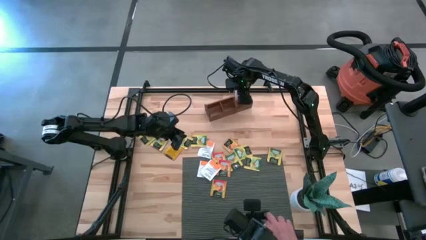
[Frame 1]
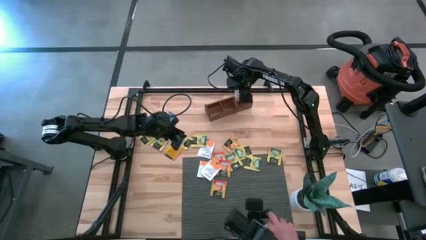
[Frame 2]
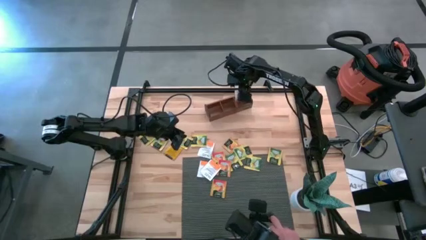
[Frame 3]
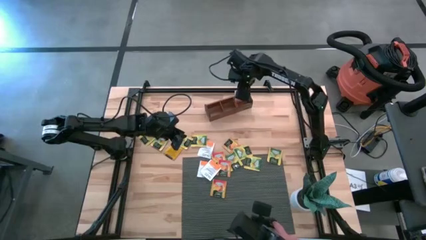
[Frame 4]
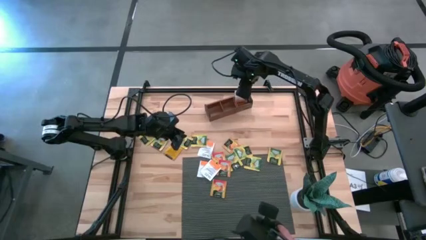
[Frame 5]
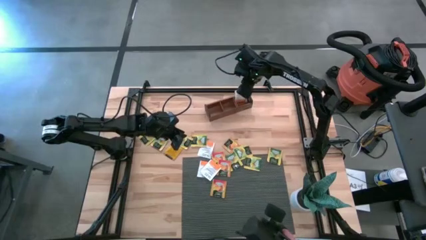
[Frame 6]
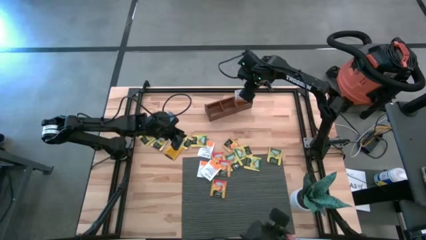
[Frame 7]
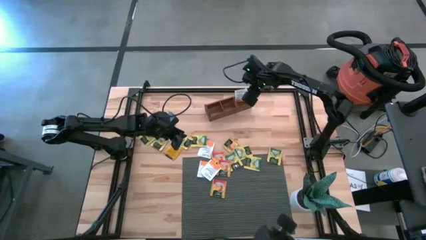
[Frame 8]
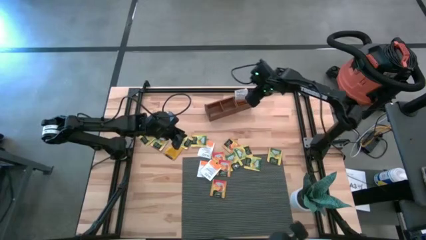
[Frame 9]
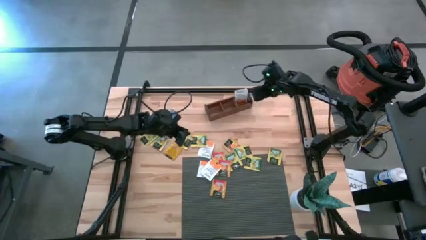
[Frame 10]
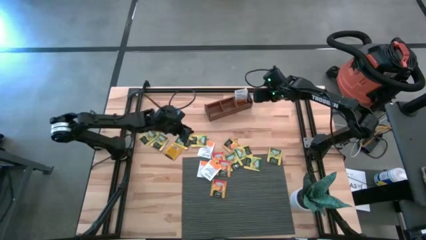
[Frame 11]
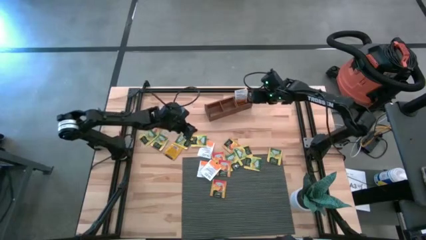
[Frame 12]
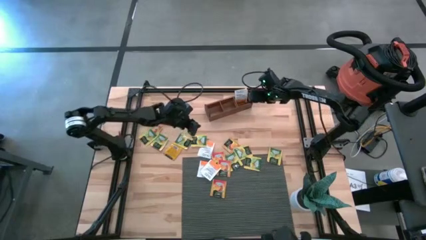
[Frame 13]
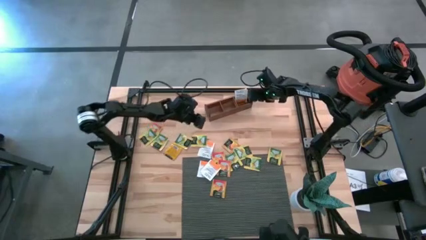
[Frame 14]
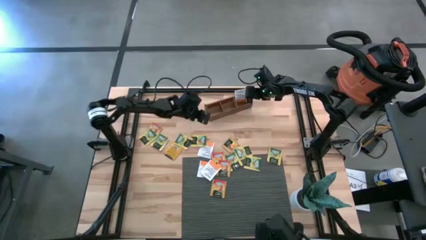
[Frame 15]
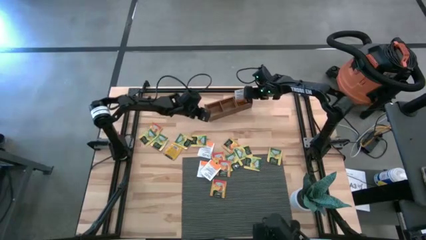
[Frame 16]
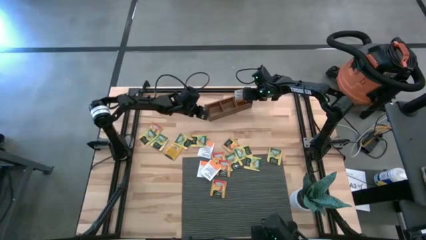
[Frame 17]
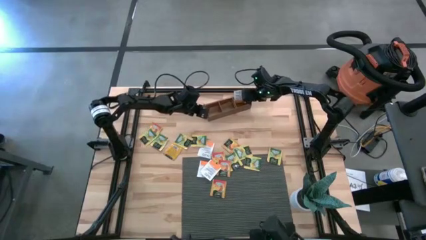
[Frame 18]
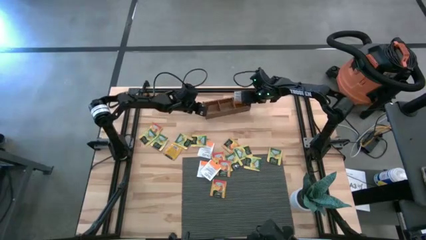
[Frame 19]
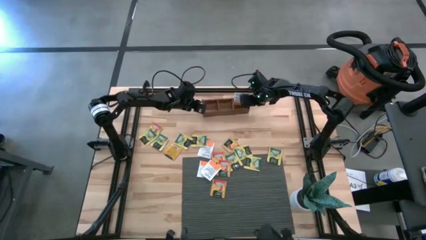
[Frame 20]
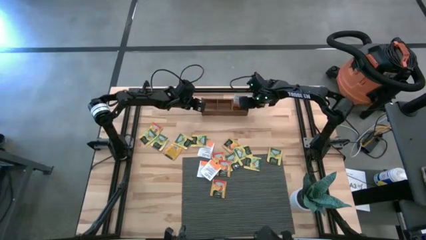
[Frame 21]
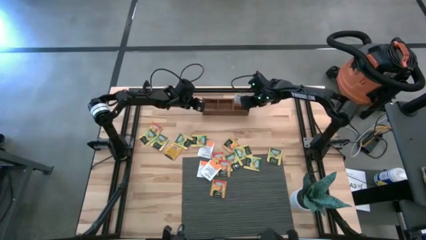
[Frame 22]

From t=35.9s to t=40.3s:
Task: Pick & Place Tea
Adjust the wooden organizer

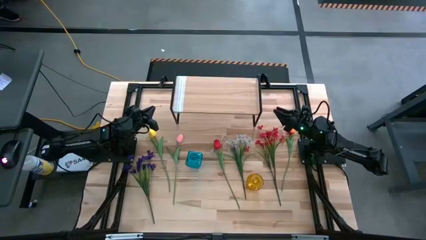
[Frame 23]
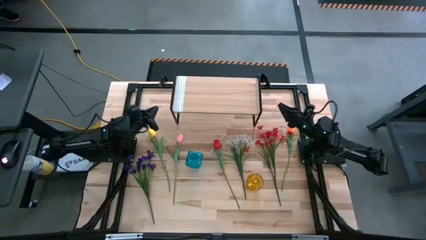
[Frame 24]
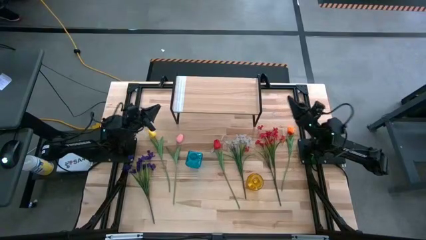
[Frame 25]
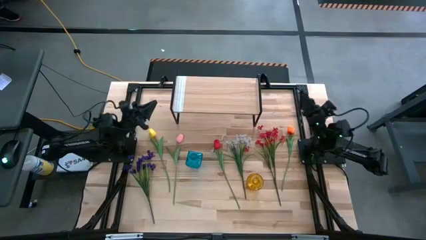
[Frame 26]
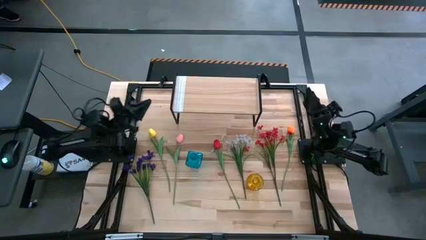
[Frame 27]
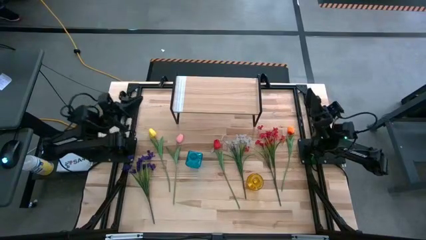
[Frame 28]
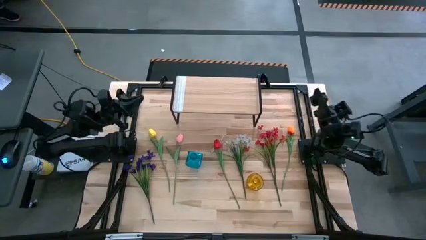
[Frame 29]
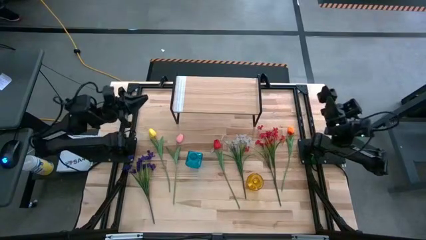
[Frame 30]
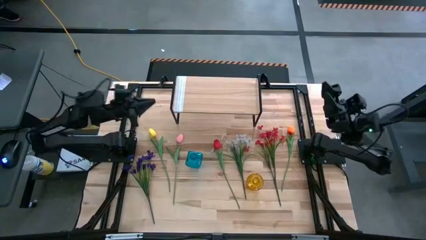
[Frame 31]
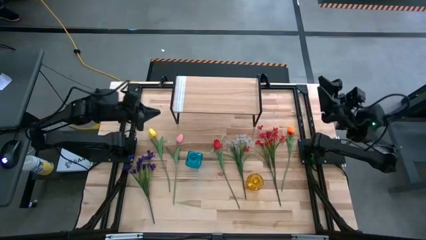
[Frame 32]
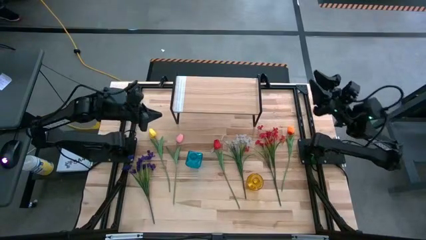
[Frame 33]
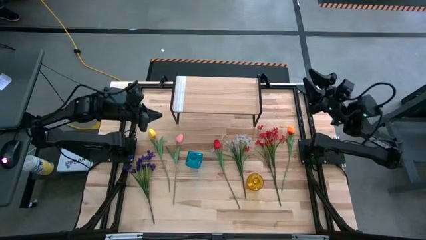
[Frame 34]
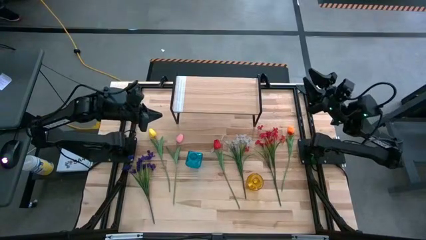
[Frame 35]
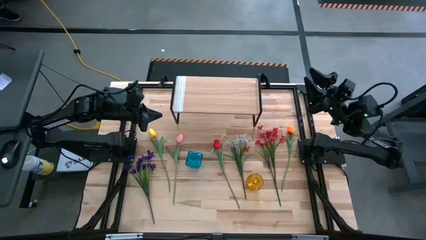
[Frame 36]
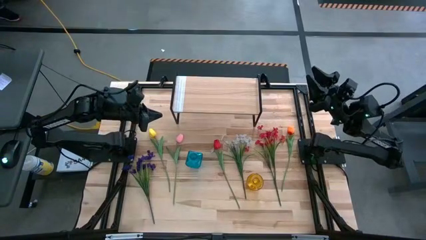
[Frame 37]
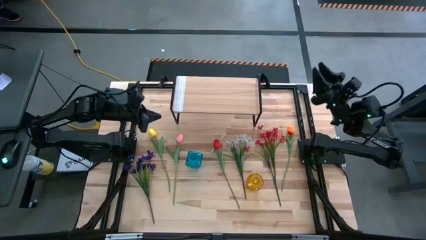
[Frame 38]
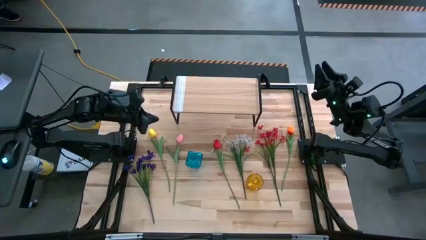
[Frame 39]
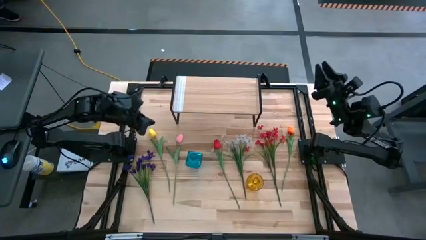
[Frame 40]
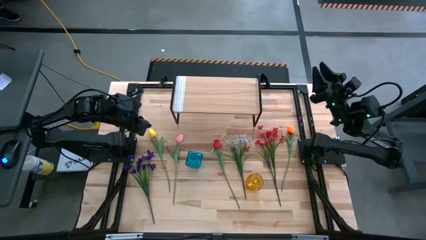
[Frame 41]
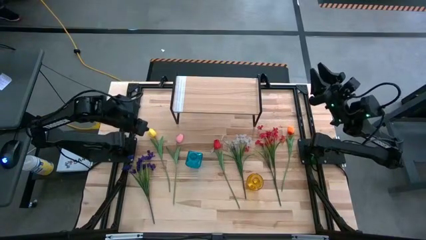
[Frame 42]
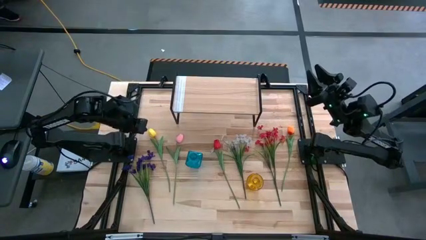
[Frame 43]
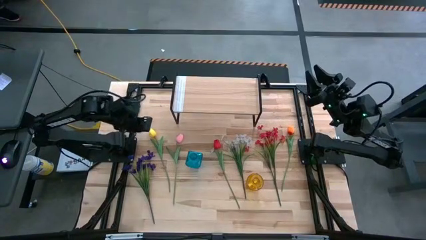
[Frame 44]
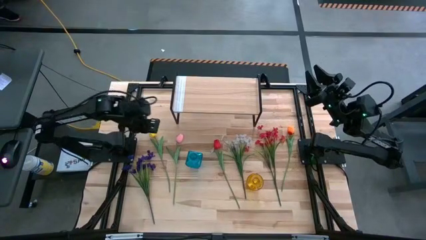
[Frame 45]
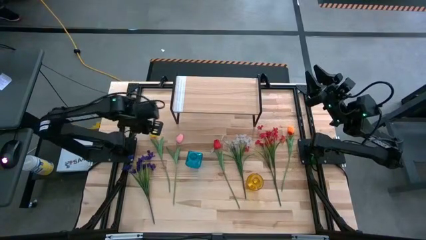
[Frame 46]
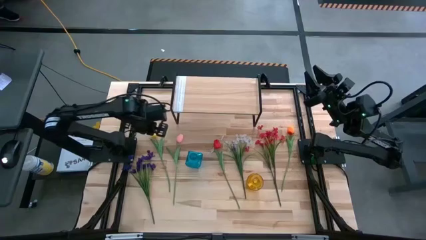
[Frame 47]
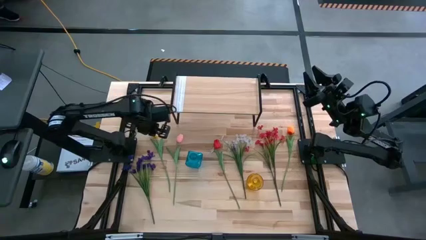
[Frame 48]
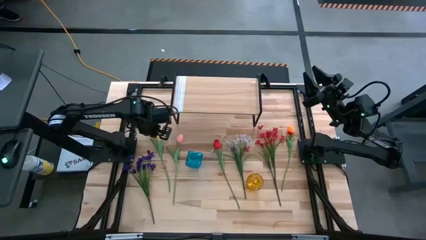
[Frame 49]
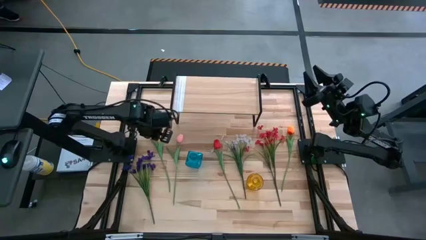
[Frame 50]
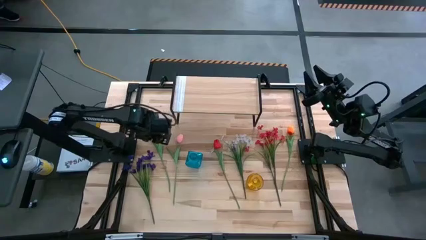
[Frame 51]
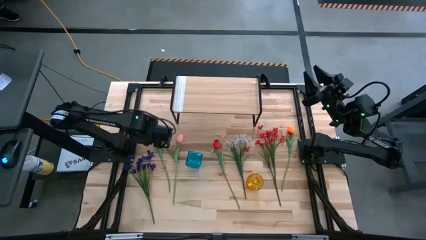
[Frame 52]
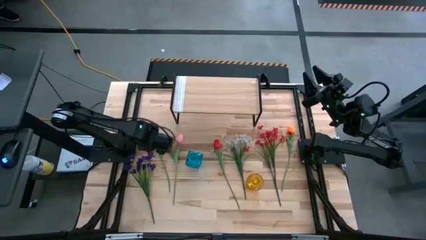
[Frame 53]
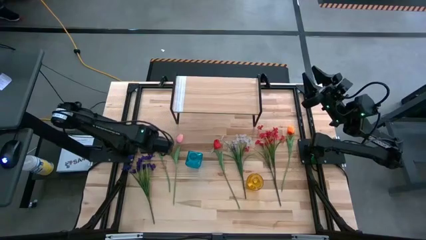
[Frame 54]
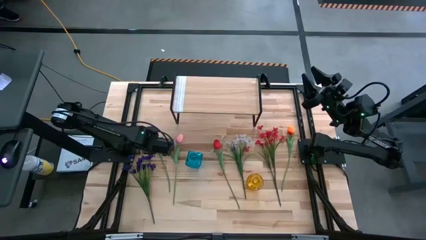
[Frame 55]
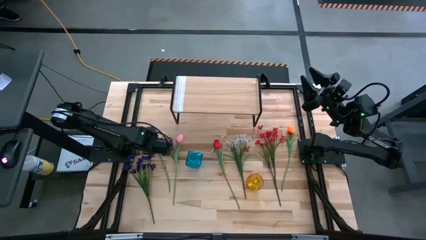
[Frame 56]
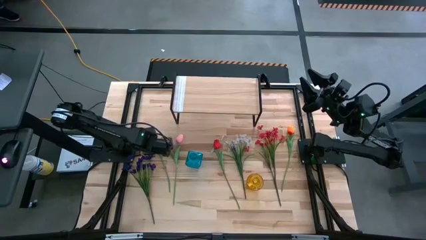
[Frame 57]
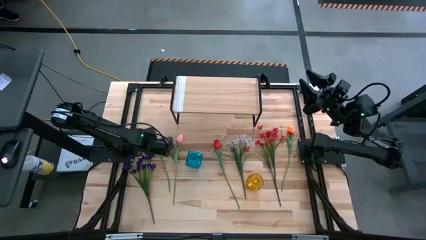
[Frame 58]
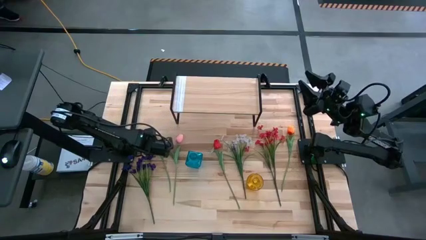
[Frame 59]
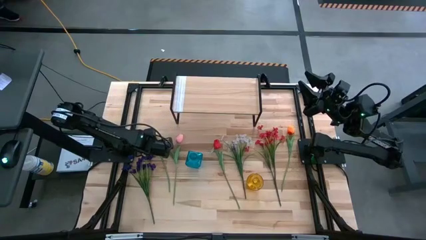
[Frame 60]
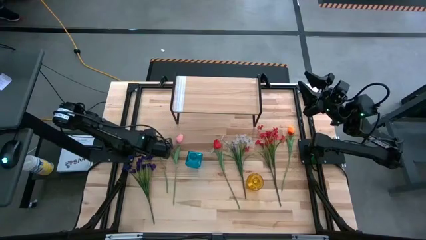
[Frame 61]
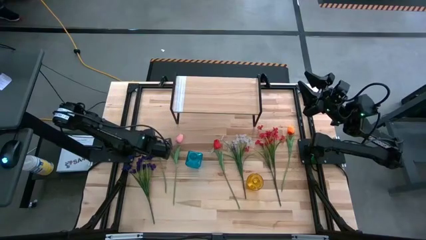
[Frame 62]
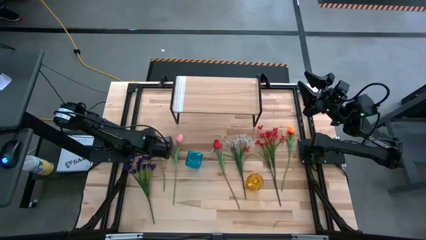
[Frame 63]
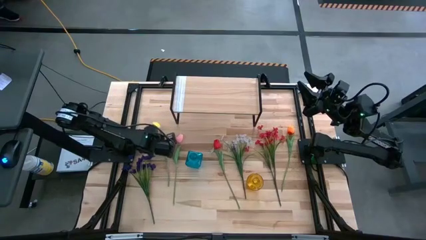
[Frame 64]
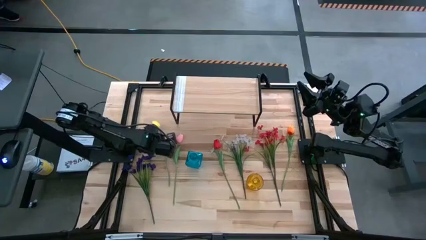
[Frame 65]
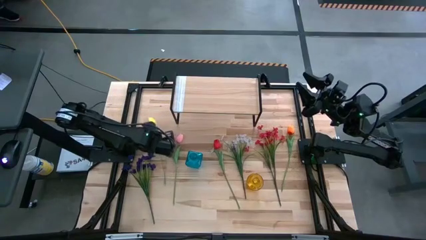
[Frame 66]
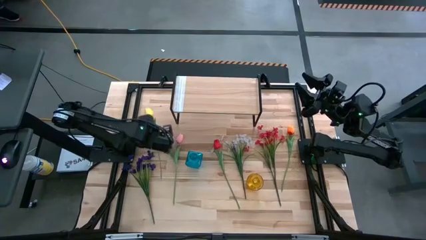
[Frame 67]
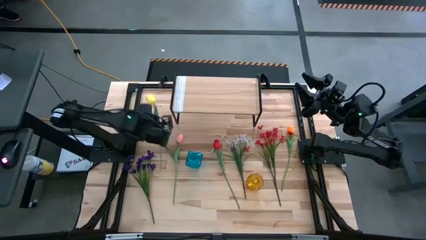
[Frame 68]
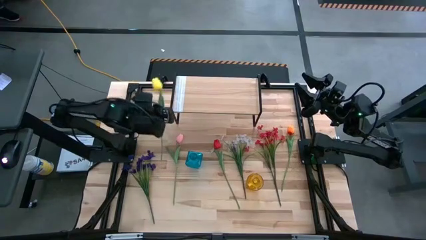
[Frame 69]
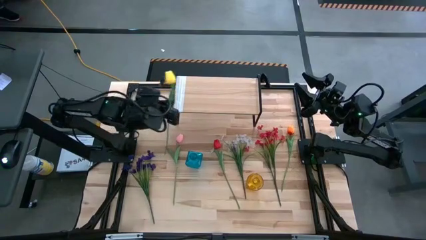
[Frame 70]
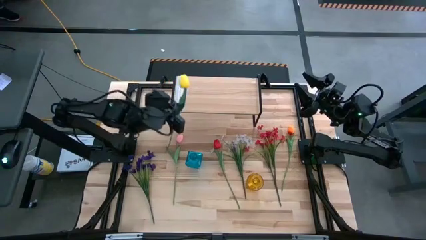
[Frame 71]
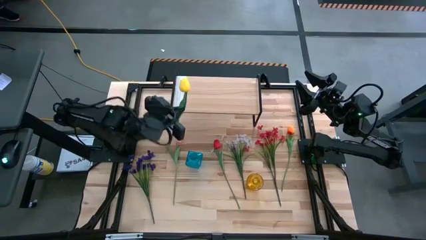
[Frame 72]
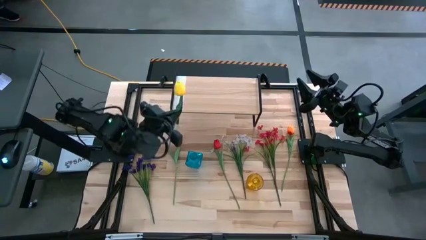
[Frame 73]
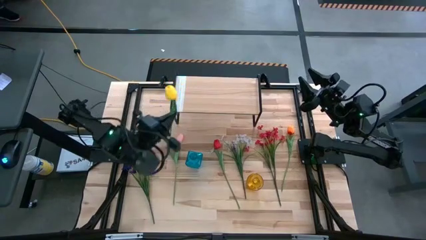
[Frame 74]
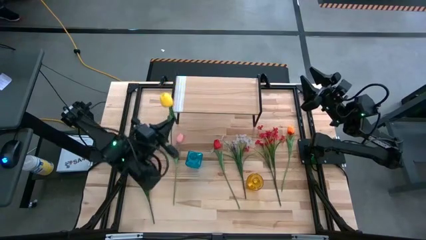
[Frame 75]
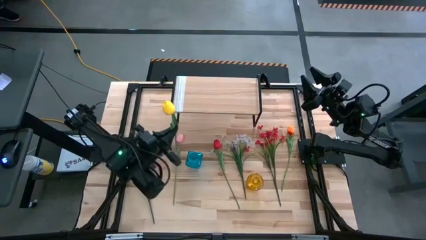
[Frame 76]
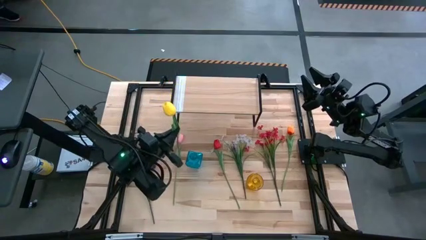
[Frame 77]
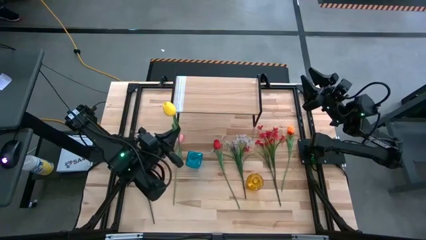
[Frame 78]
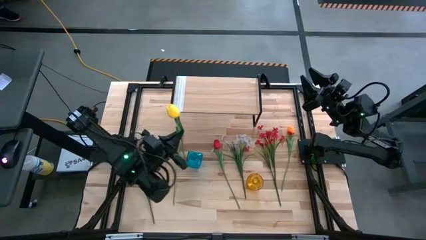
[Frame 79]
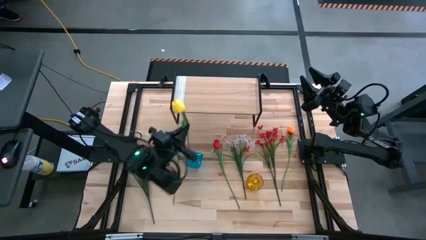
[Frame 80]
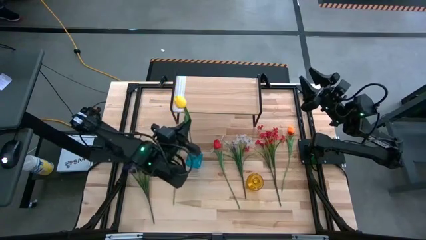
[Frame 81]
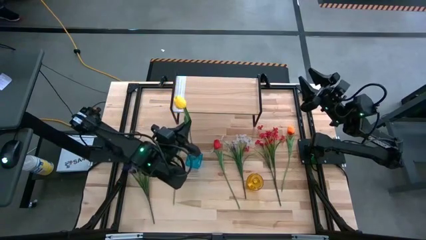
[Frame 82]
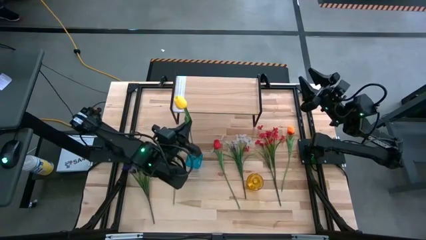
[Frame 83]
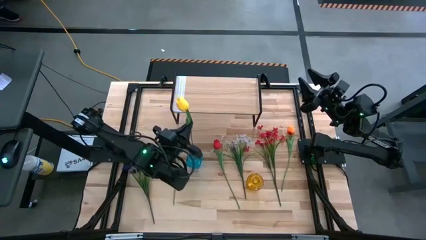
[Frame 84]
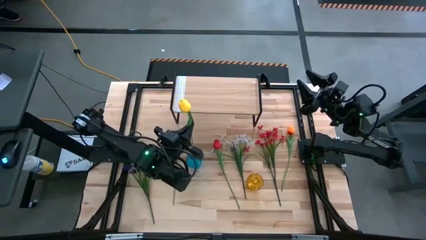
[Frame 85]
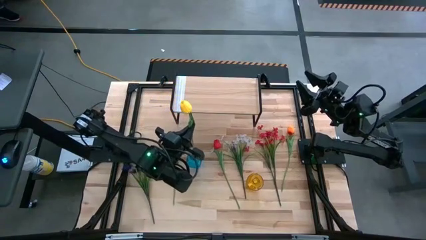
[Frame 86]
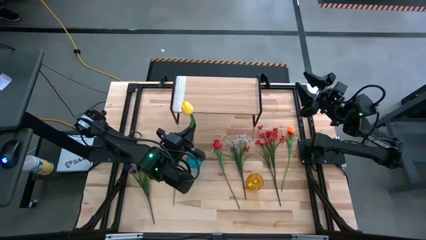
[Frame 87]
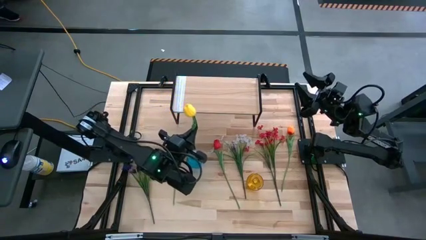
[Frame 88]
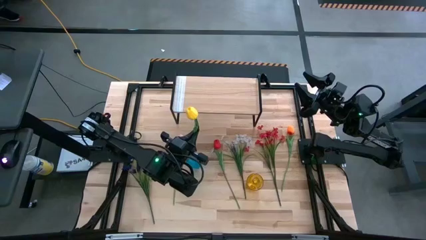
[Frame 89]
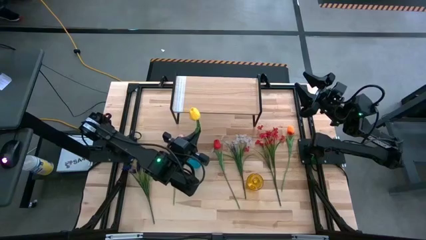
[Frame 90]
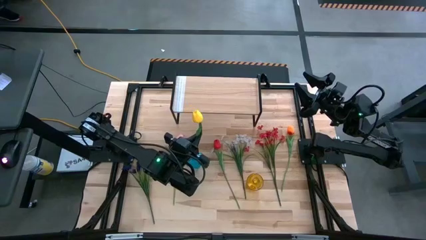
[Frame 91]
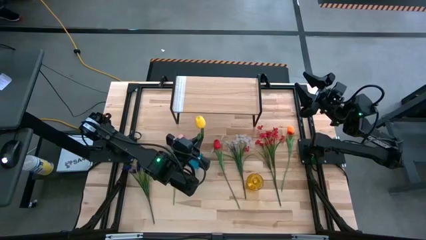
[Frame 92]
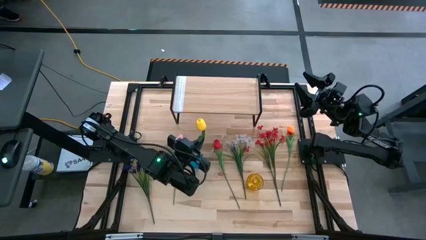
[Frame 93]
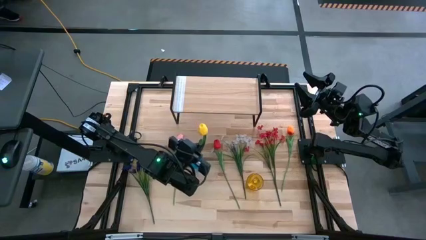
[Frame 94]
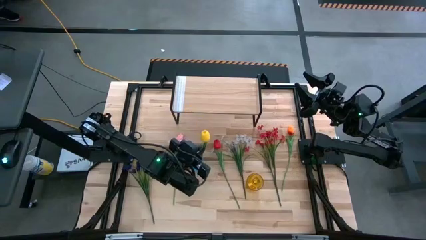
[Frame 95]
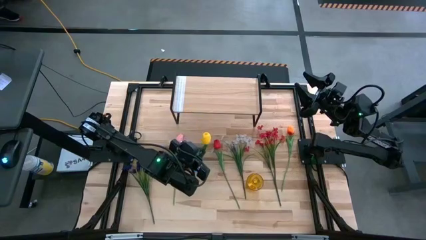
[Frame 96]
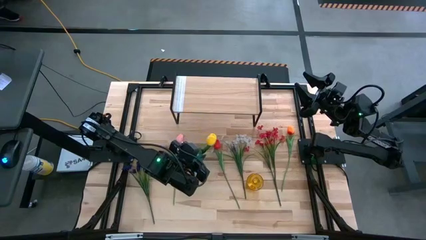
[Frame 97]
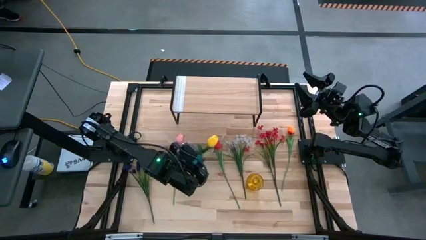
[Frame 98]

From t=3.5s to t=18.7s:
Task: Pick and place flowers into a vace then onto a shelf
Put the yellow flower into the blue vase
